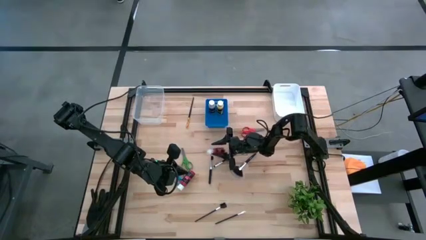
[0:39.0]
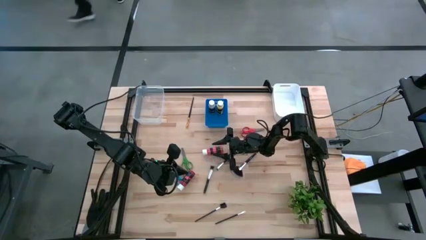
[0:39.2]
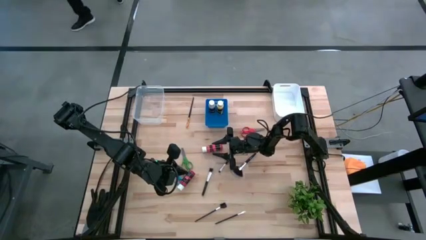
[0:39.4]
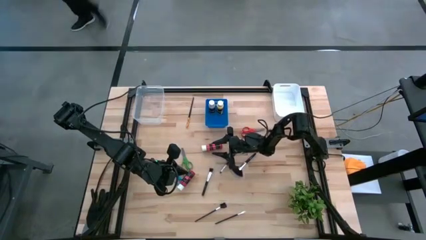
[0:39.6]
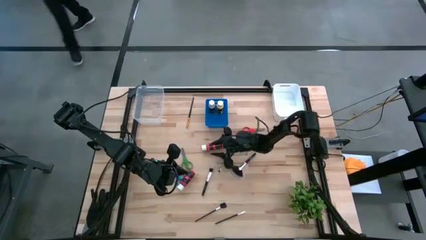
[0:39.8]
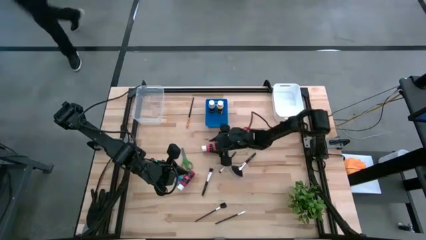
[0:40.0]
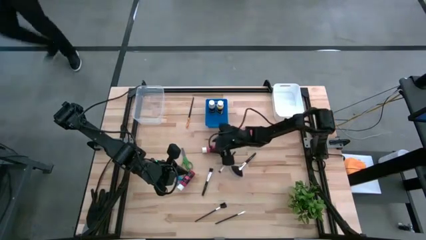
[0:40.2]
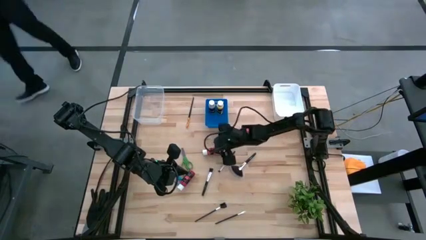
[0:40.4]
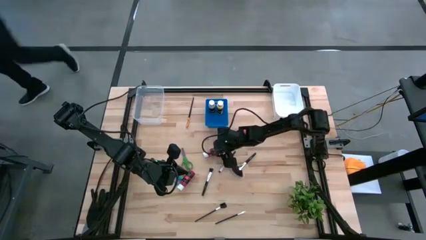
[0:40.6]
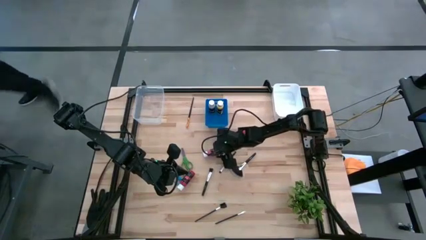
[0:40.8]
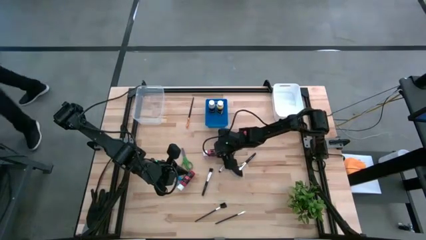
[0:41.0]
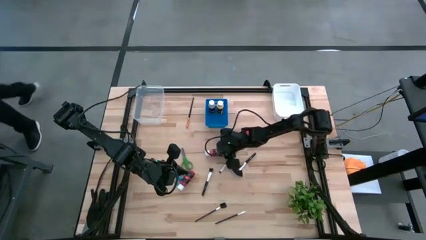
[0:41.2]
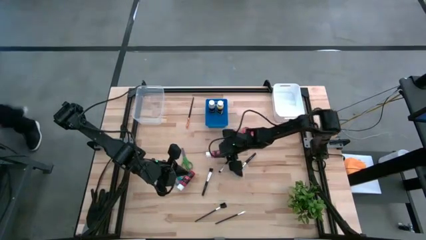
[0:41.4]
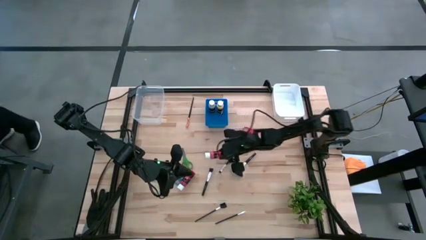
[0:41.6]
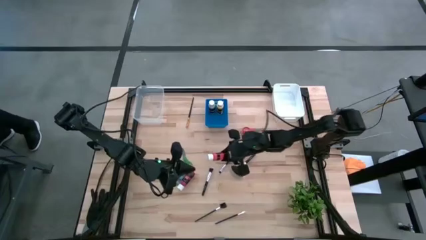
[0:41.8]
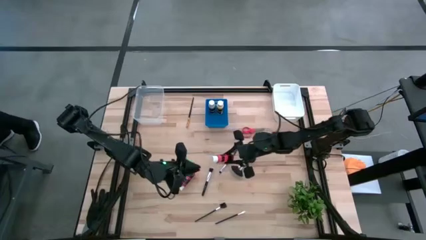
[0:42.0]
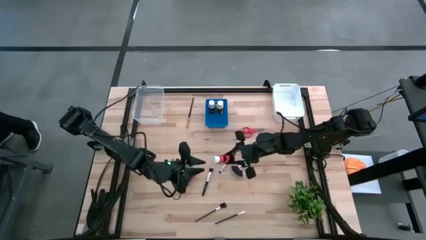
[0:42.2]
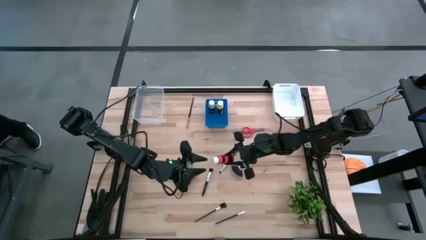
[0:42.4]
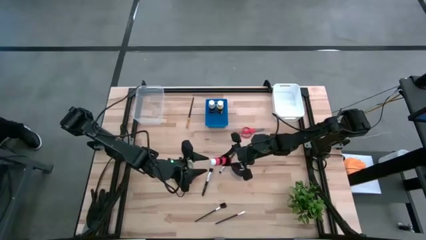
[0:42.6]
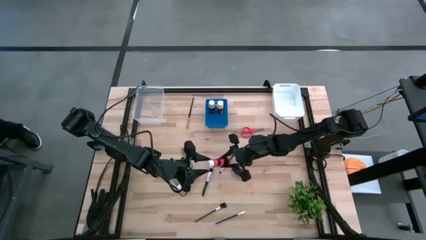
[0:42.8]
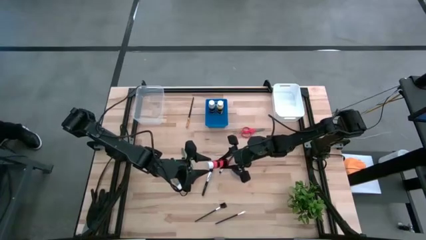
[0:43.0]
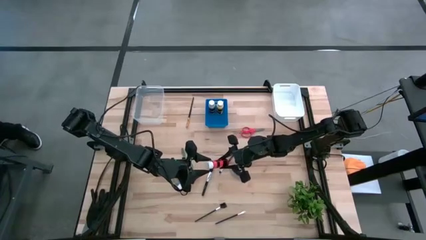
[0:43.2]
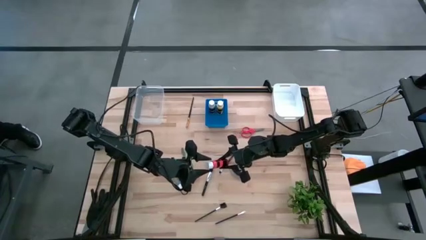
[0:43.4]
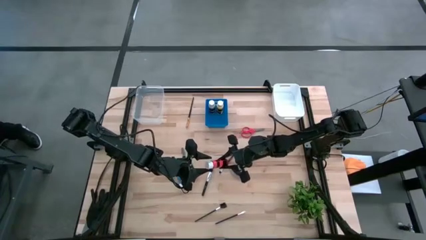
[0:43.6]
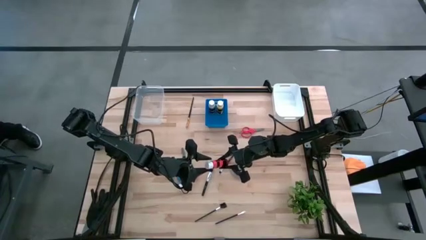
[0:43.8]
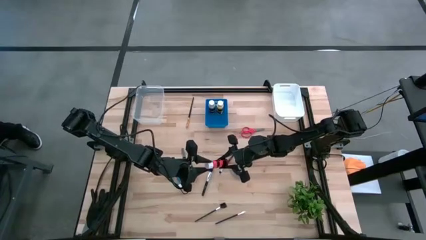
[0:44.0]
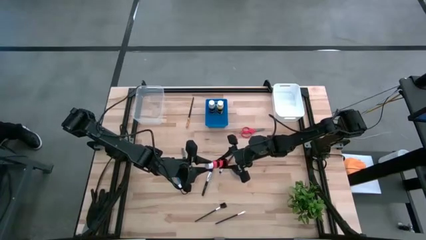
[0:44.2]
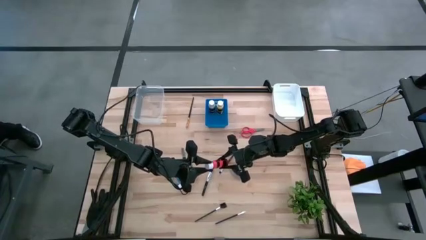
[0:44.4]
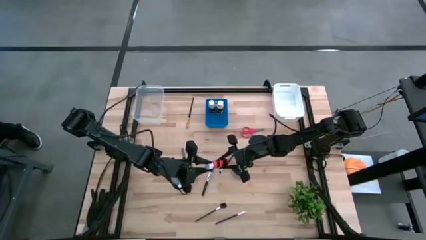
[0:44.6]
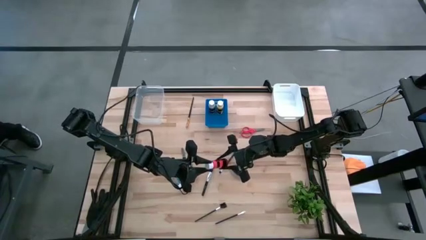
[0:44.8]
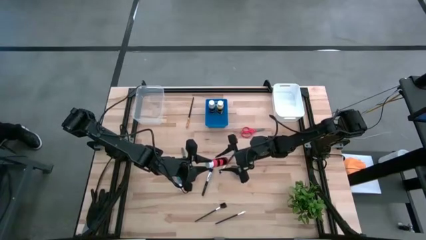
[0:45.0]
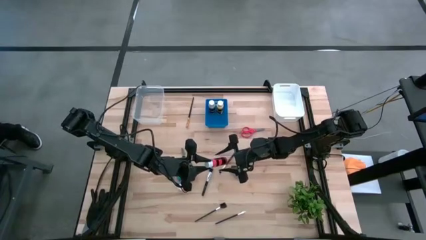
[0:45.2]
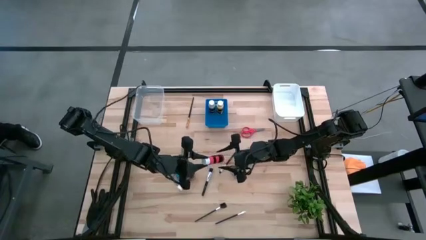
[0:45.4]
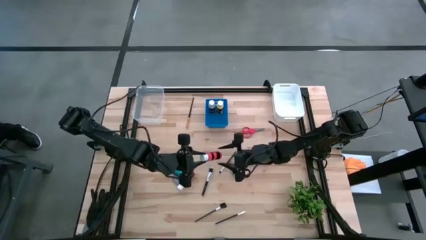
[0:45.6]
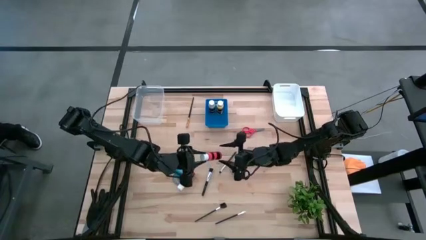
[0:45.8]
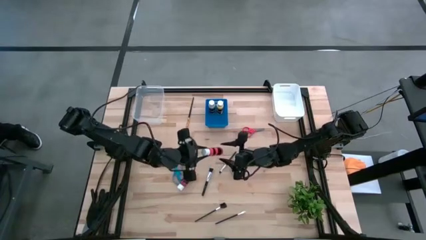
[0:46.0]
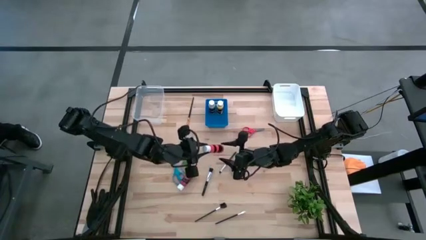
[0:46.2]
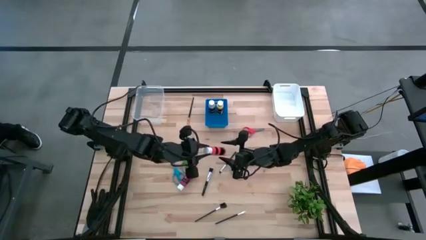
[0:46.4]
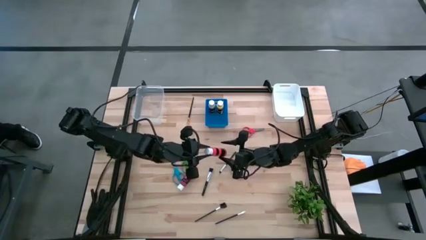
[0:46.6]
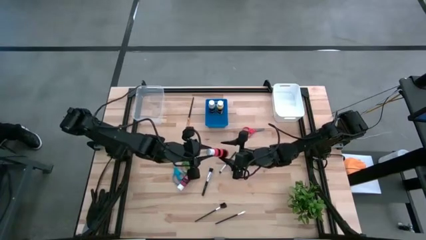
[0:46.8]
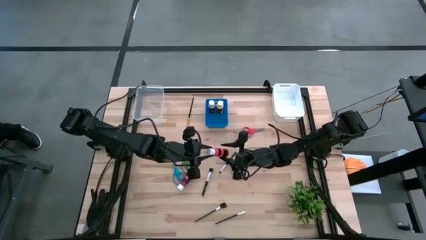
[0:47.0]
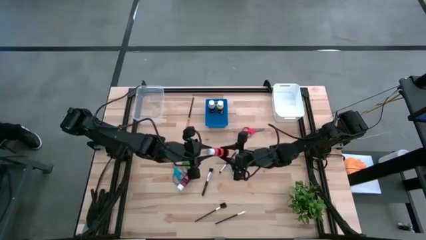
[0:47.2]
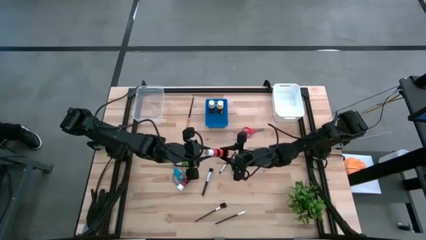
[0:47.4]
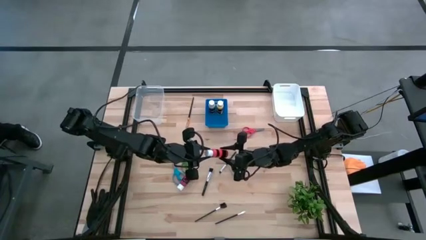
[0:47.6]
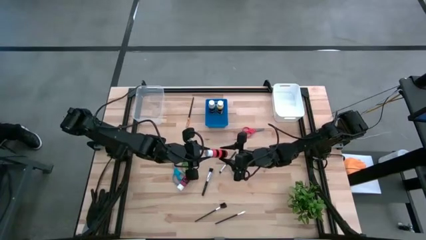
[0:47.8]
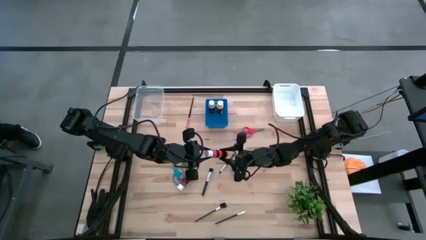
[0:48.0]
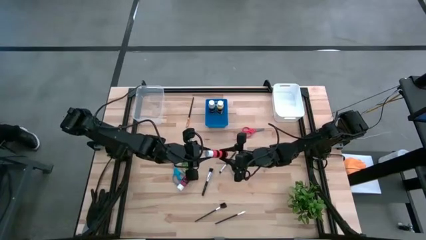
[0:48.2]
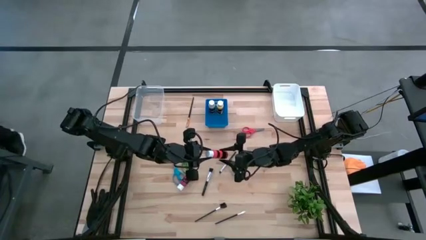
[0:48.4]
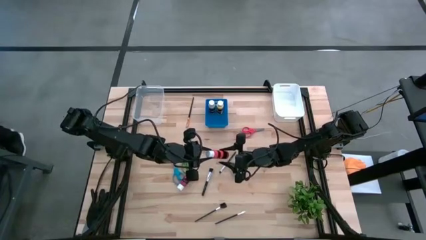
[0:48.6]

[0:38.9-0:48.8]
Task: Pick & Place Paint Supplies
Put the orange paint bottle into the blue bin
